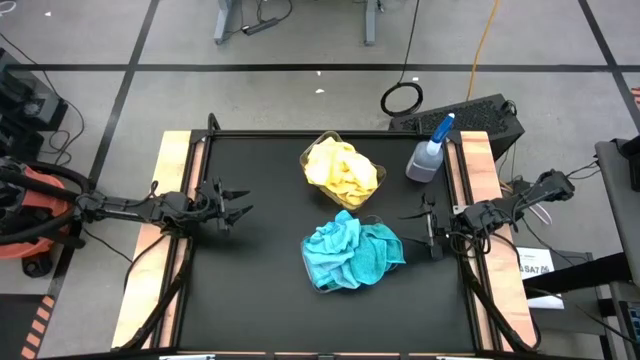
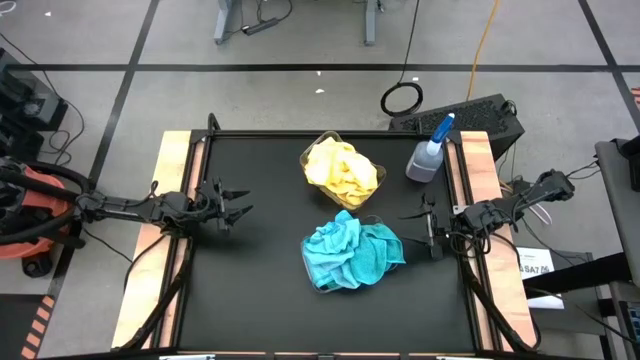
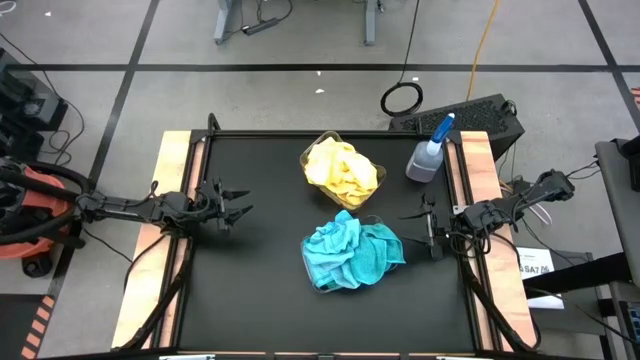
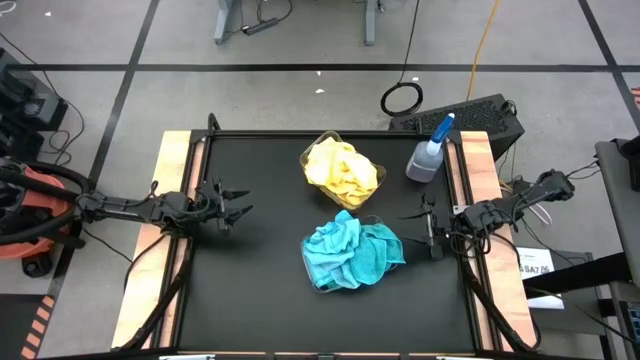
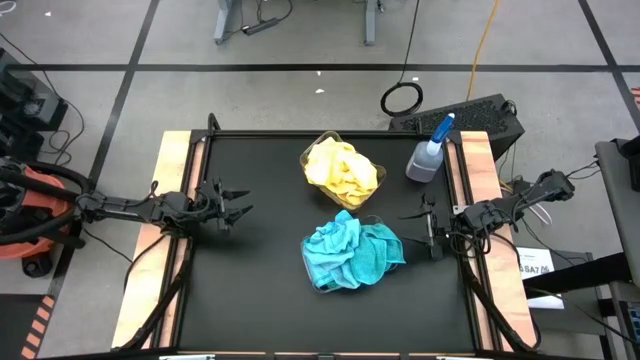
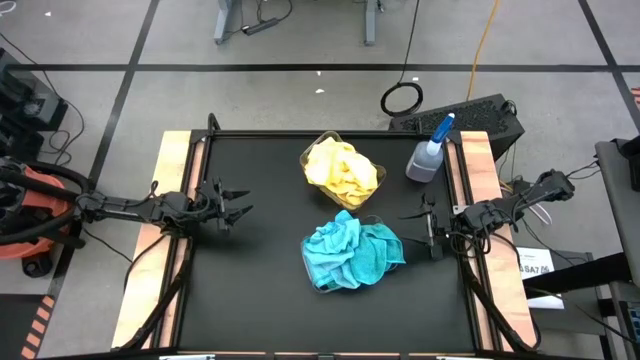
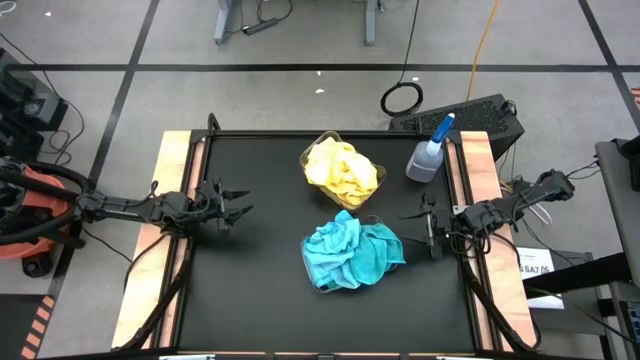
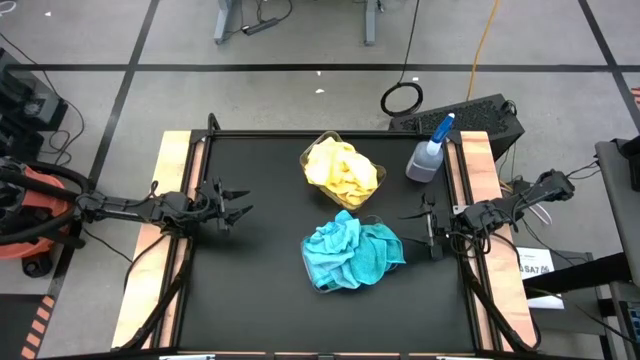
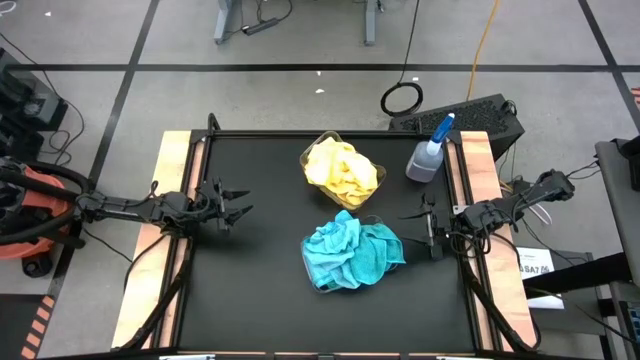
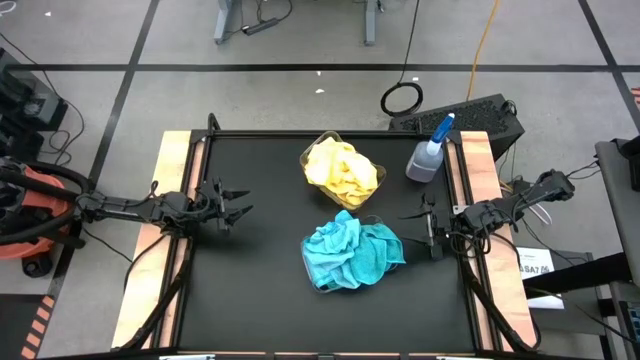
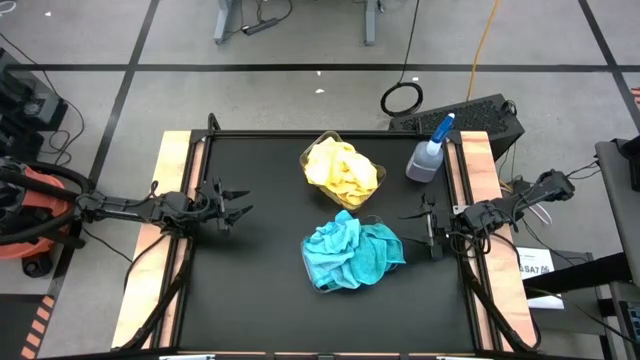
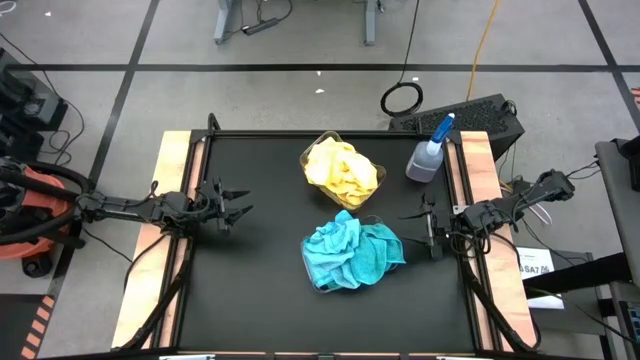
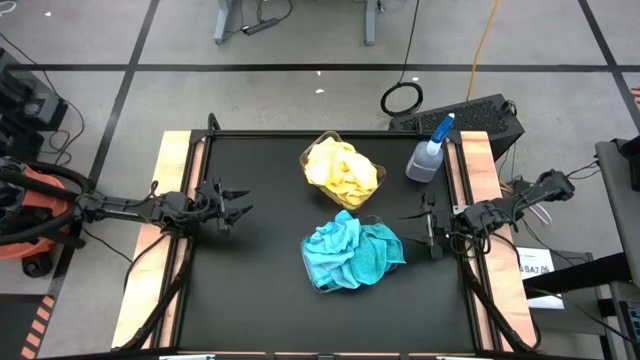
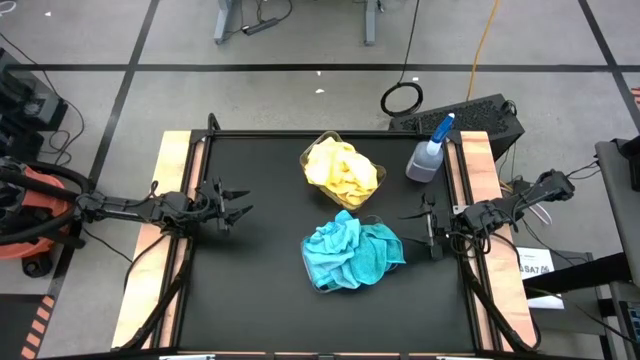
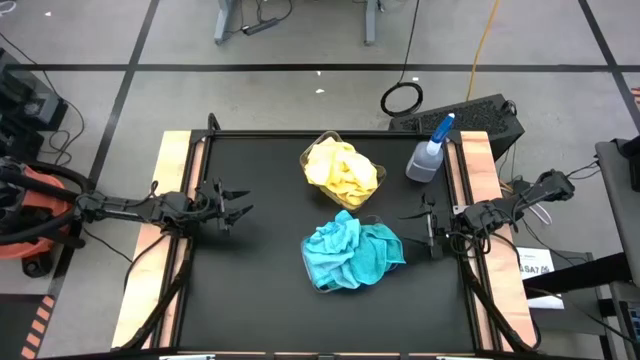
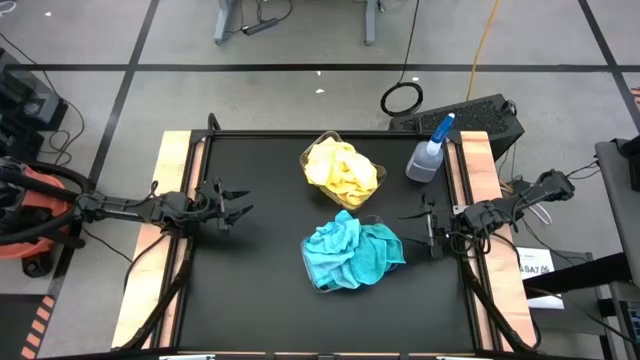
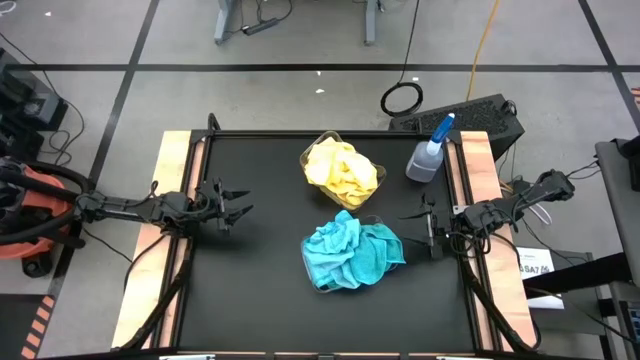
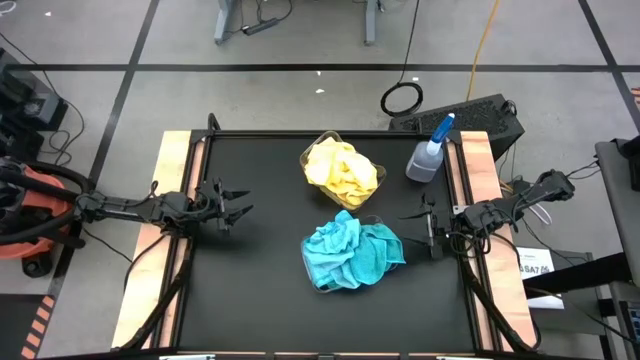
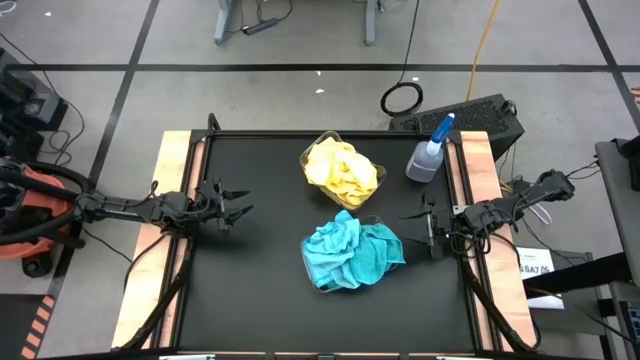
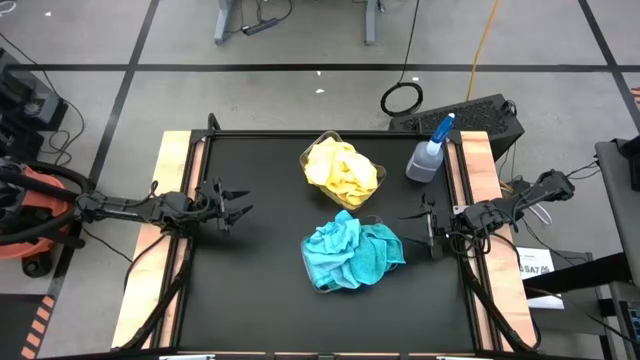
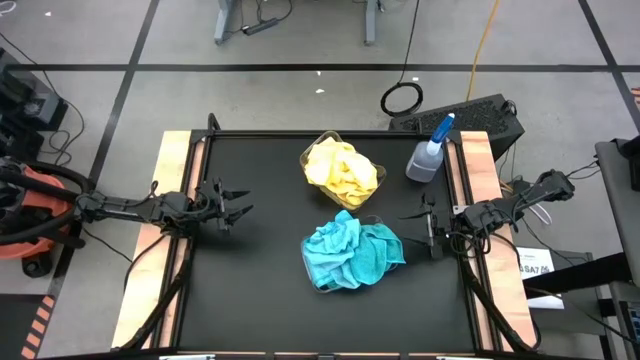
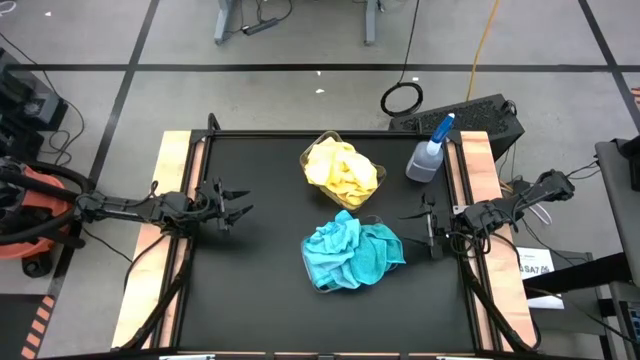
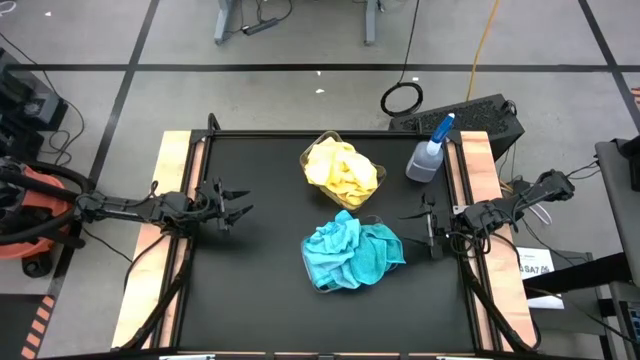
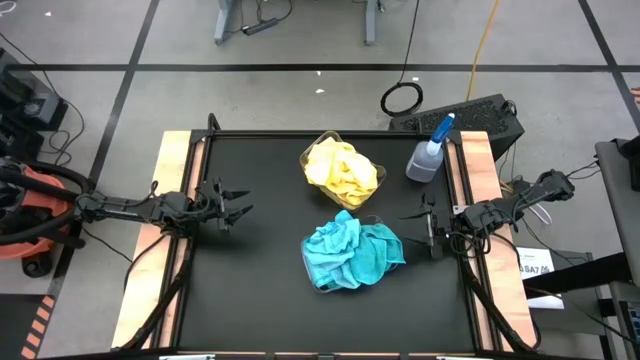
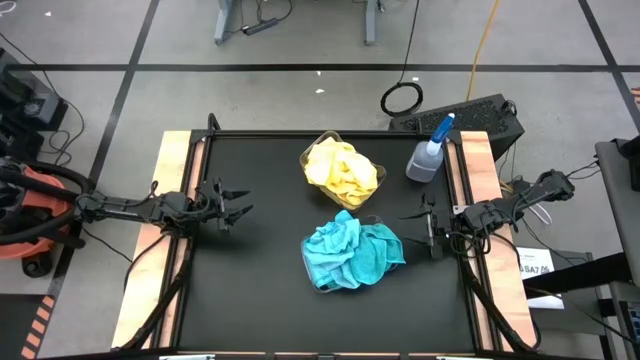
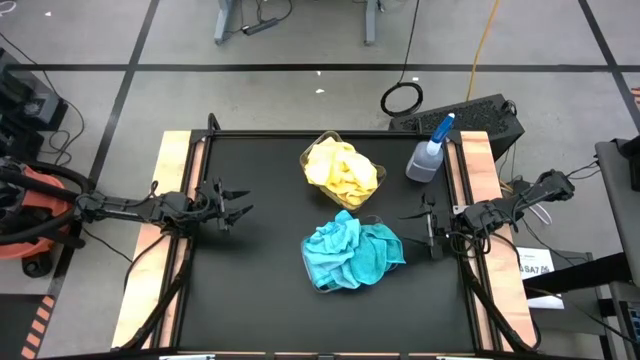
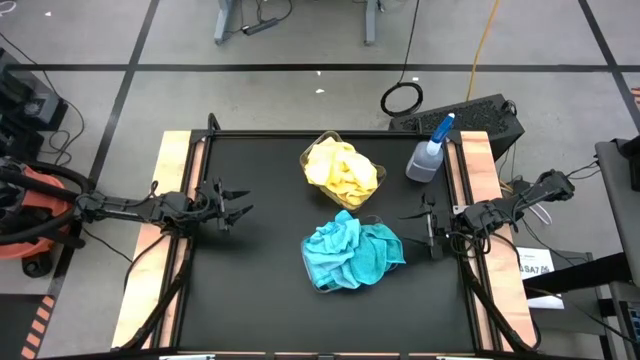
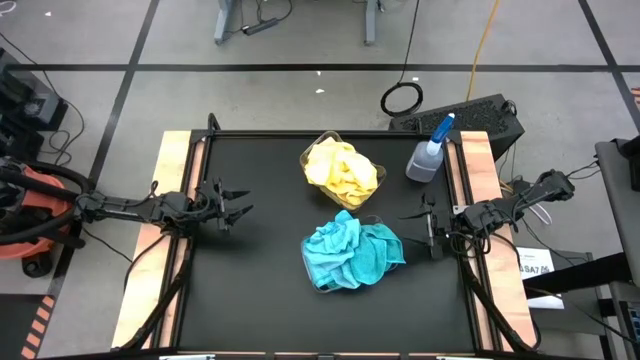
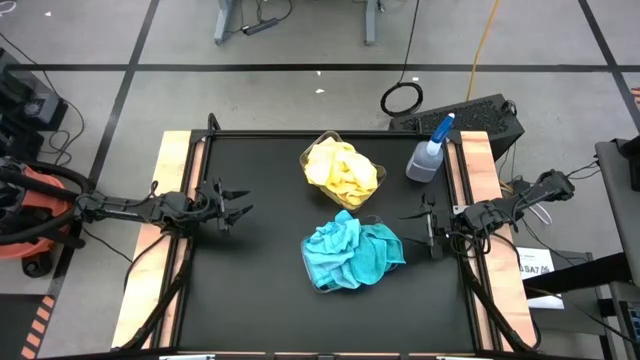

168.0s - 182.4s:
Task: Sort microfiber towel by color & place in baskets
Return to Home Position

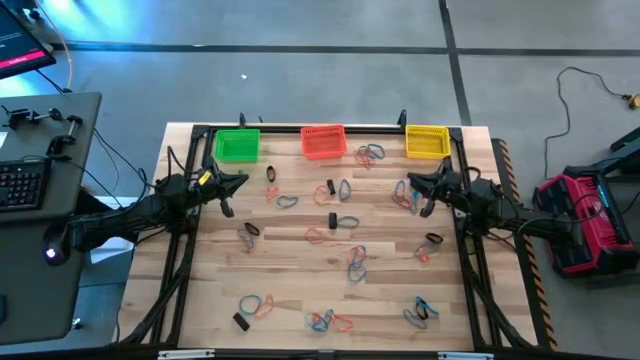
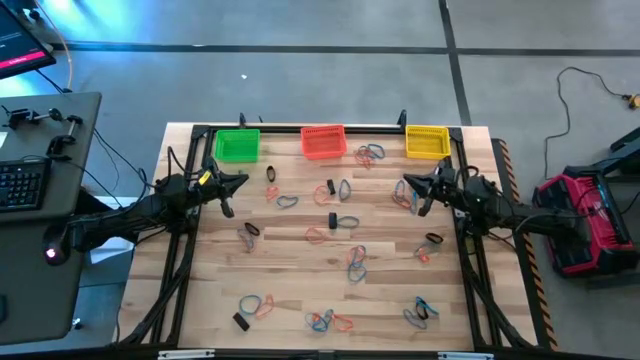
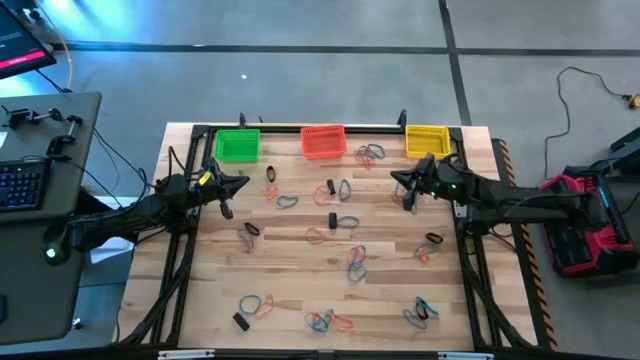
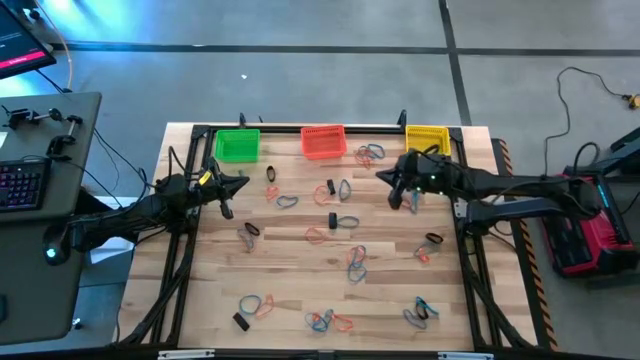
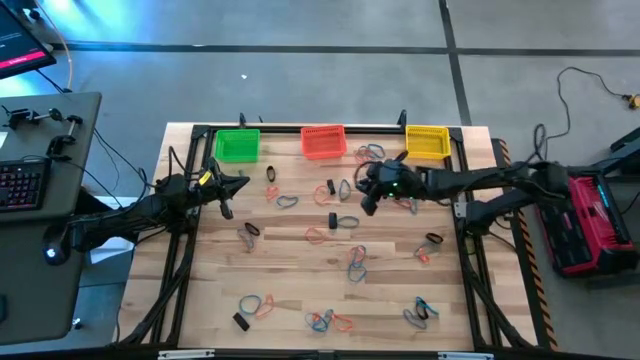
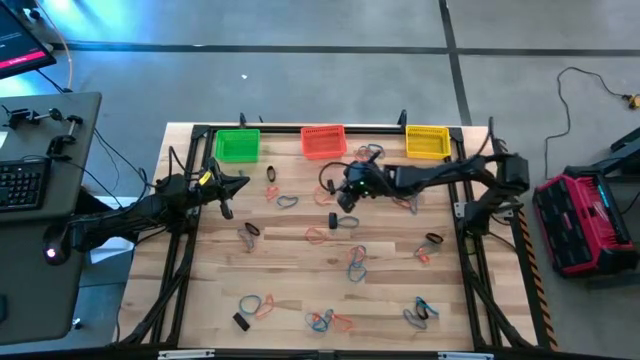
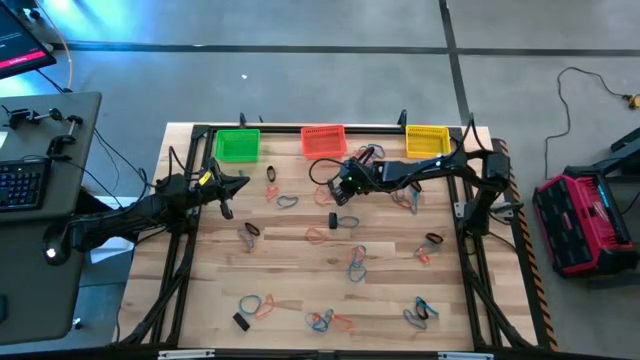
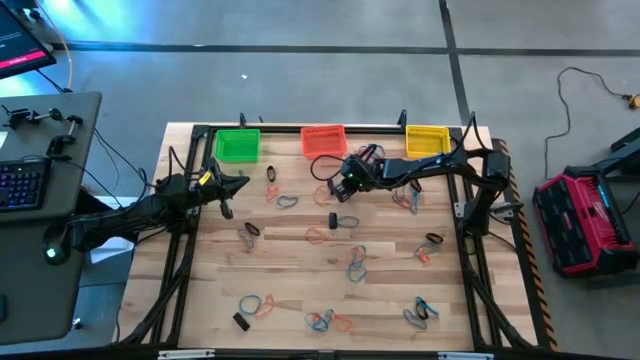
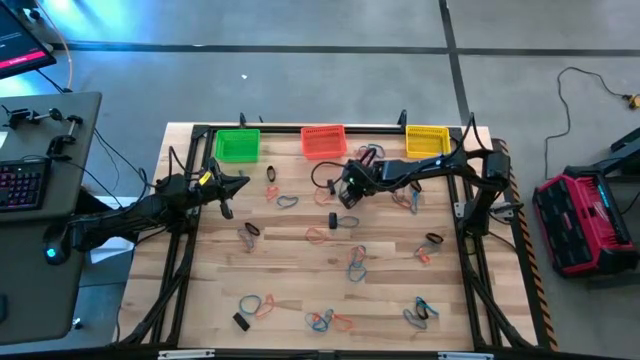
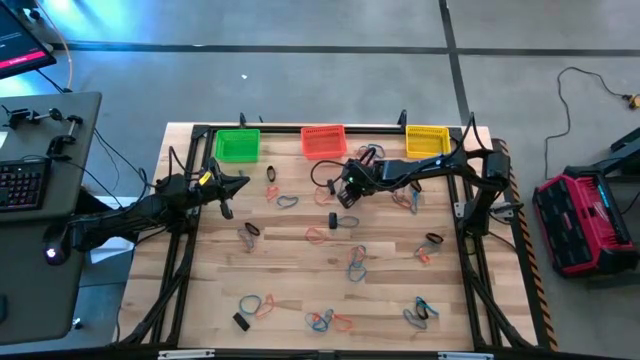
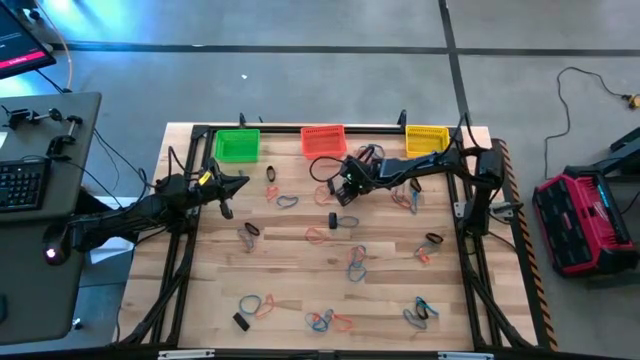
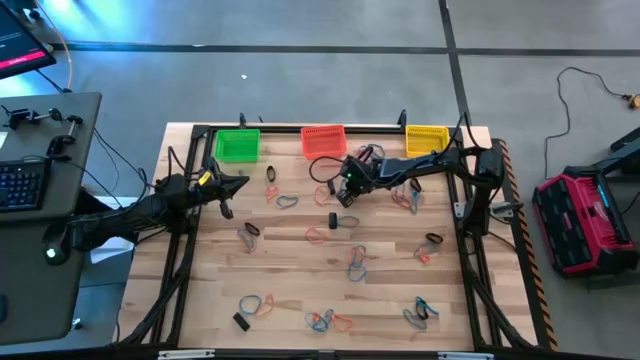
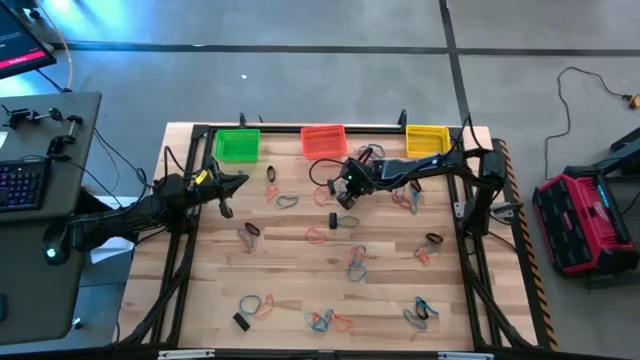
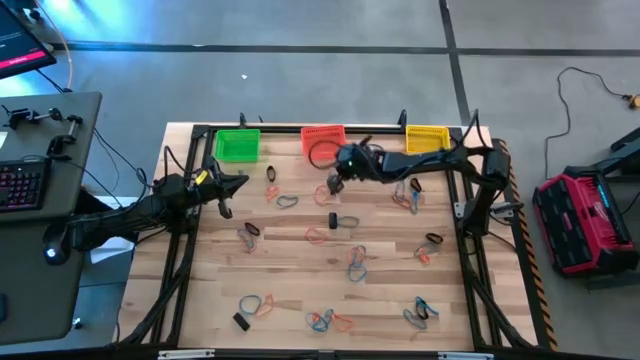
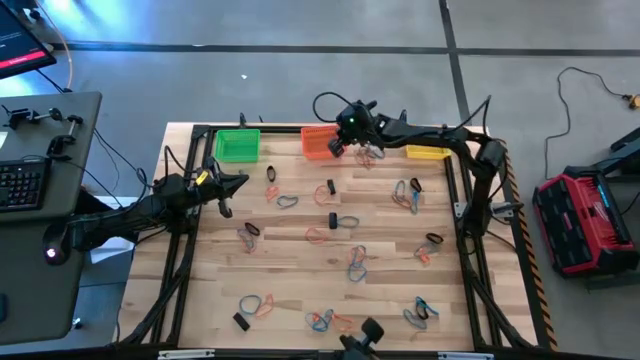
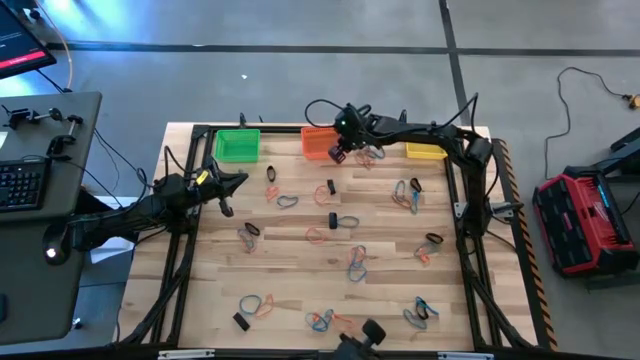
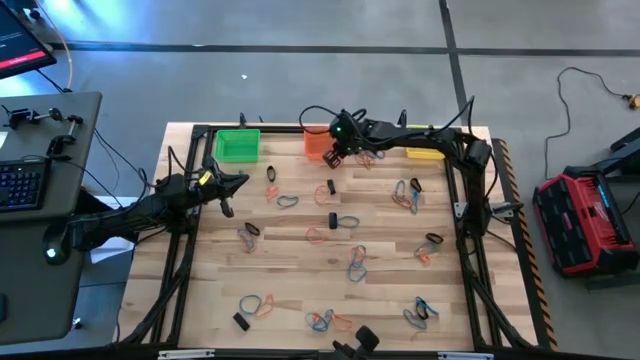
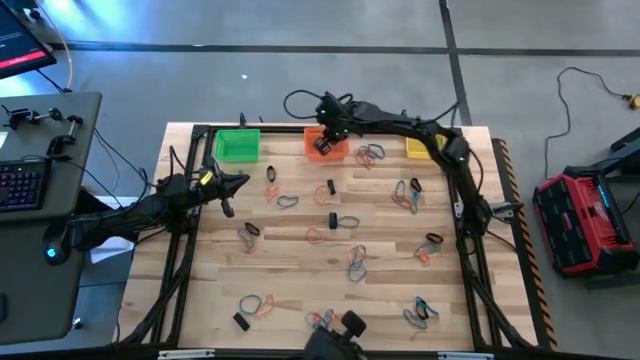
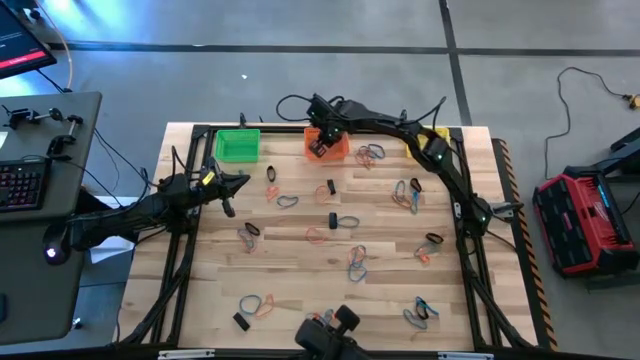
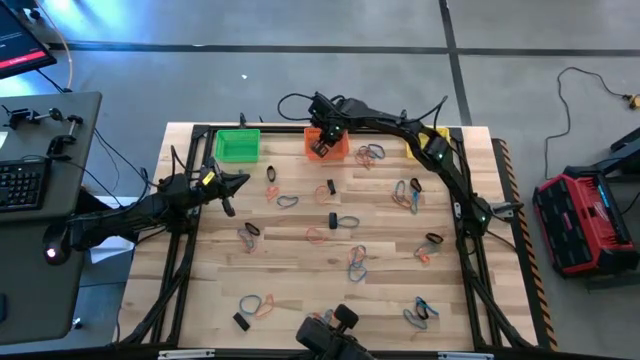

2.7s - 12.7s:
Task: Sort rubber bands into baskets
Put the blue rubber band into the orange bin
